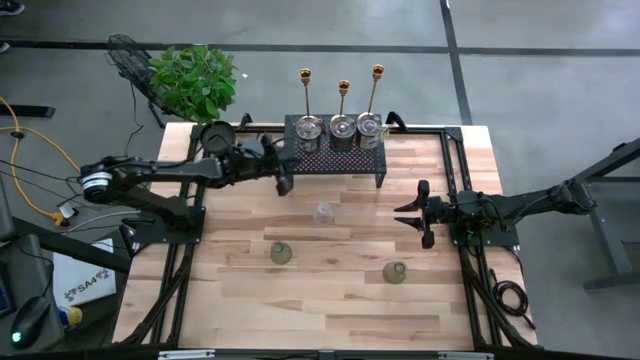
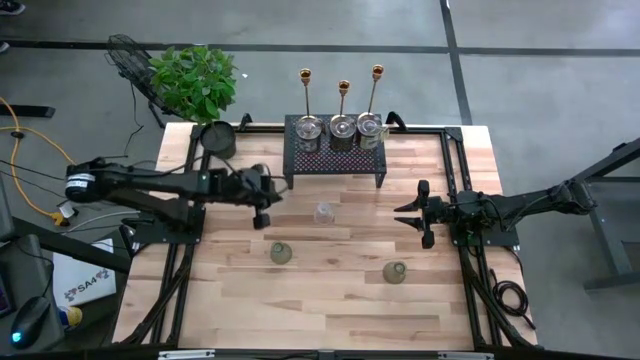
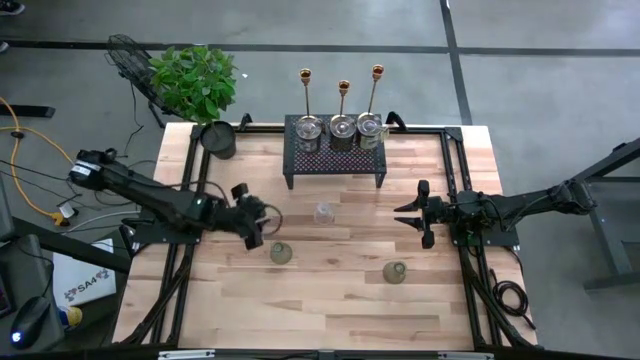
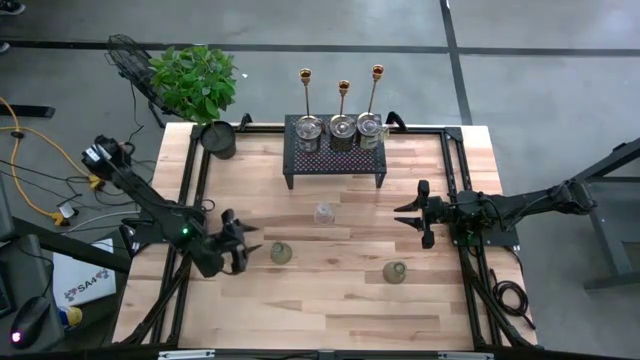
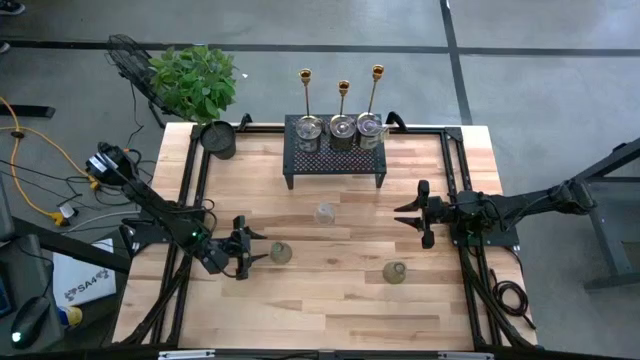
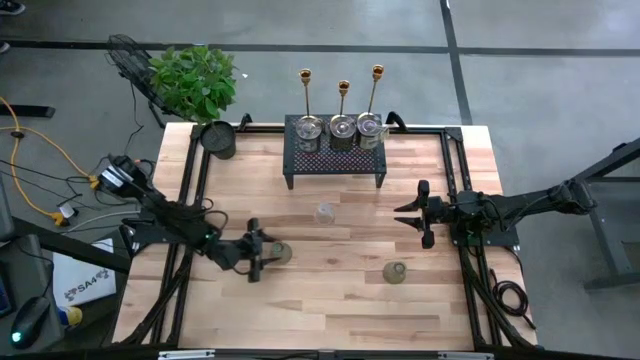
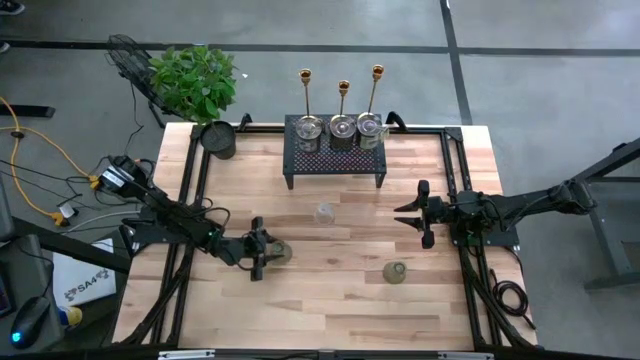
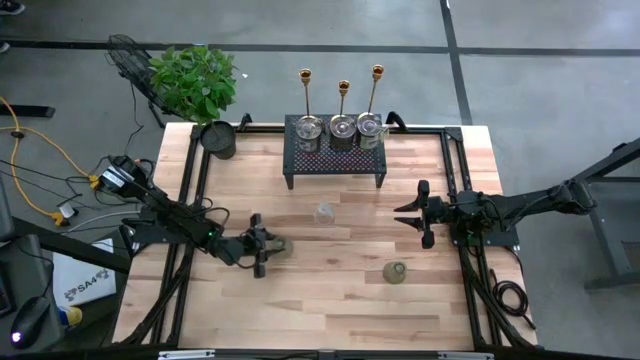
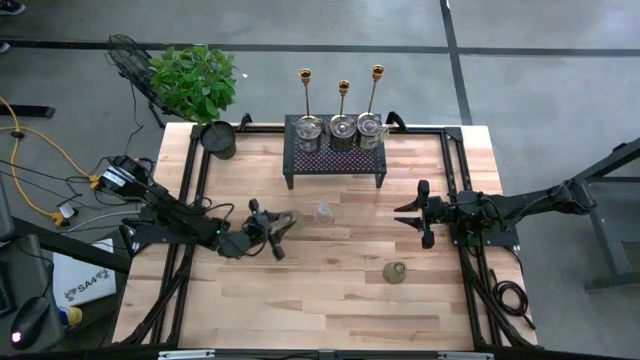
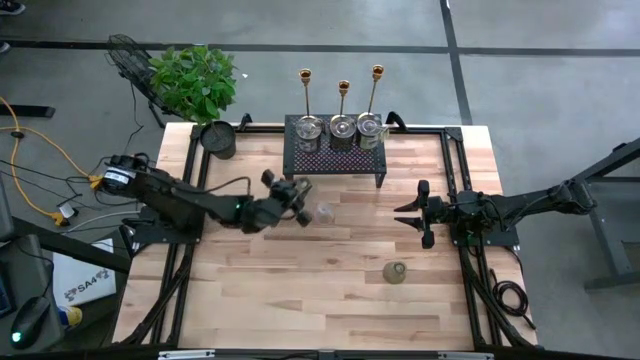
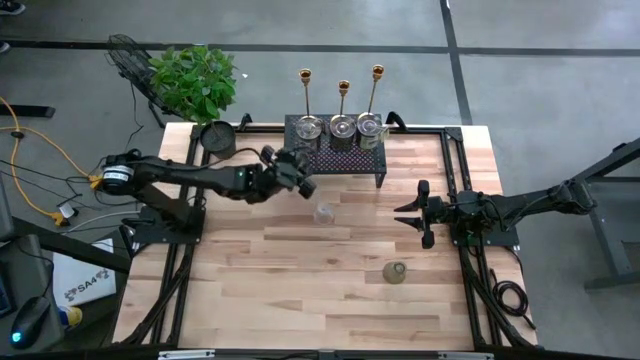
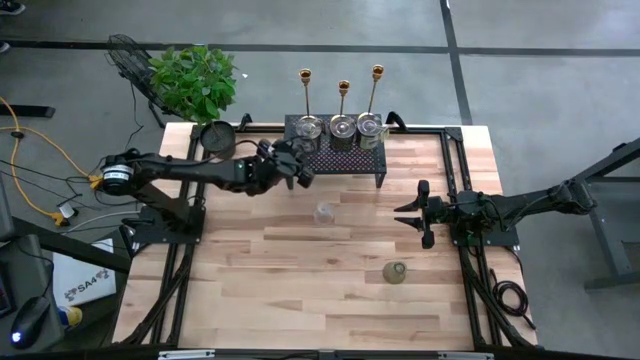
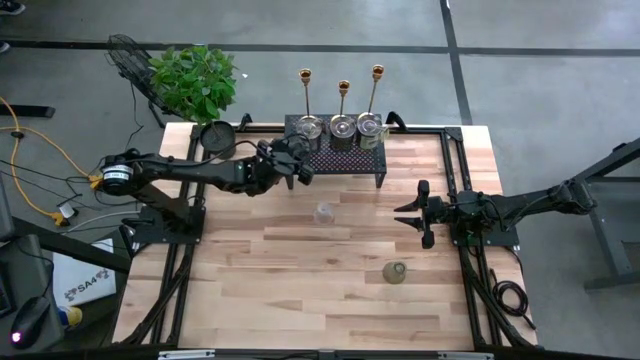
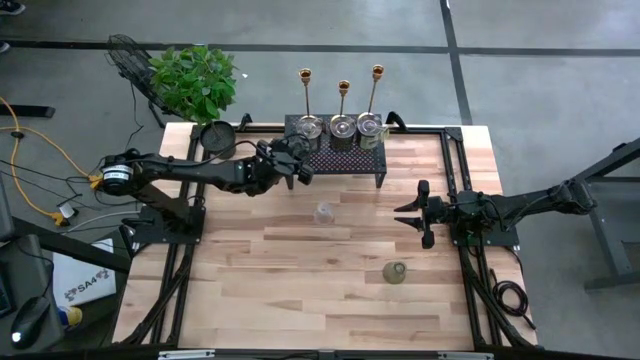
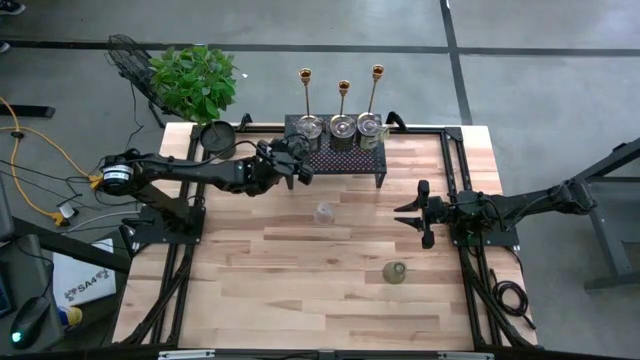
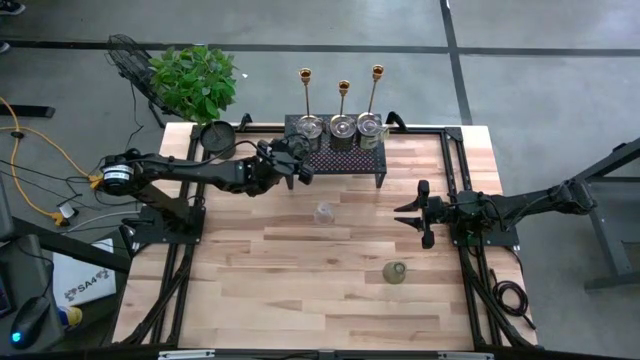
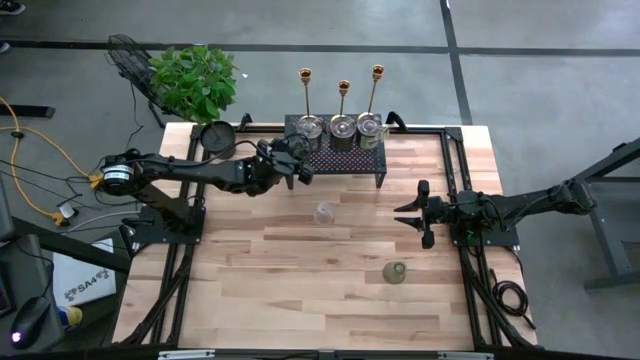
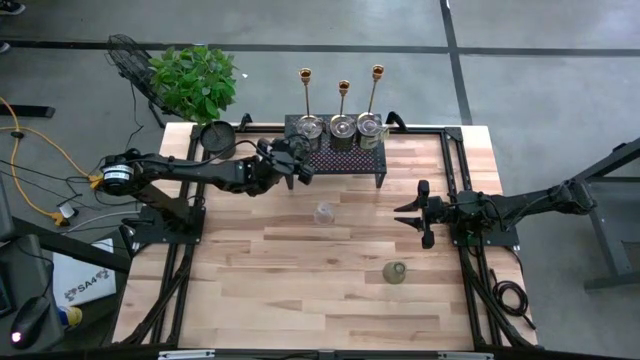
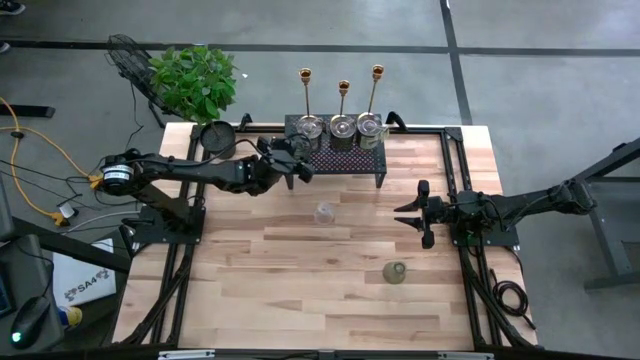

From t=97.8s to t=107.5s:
Task: Pick & Place candle stick holders
Put the top green glass candle holder on the shelf

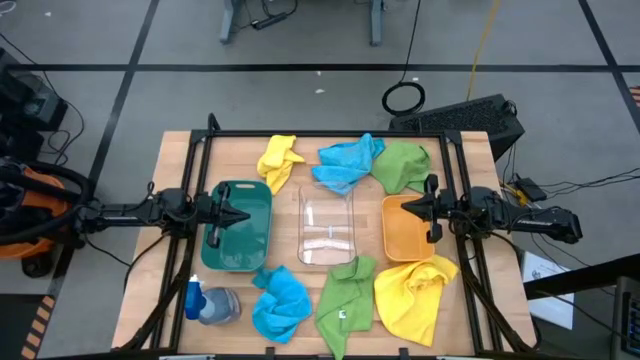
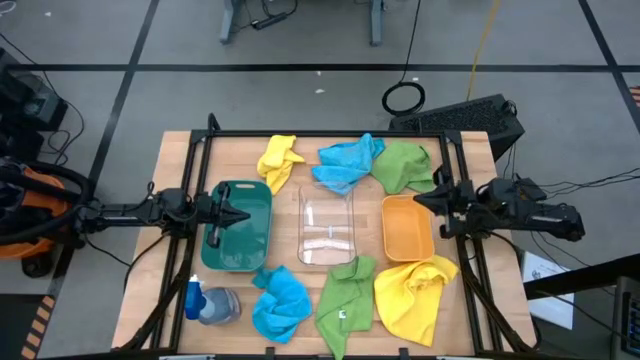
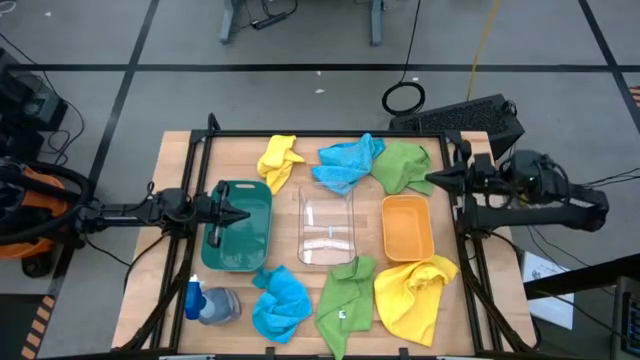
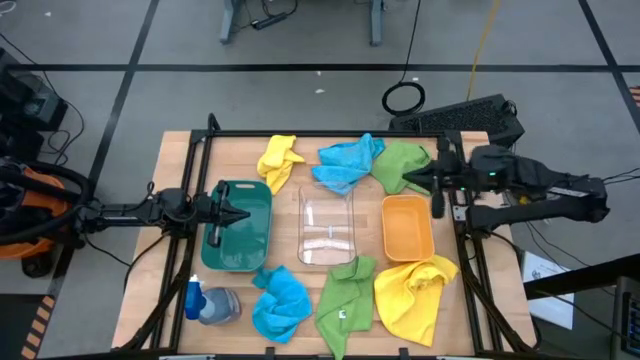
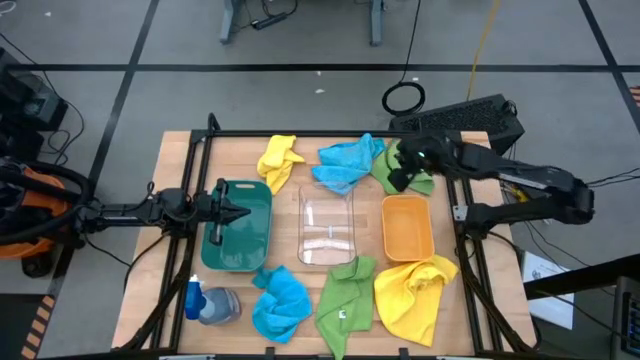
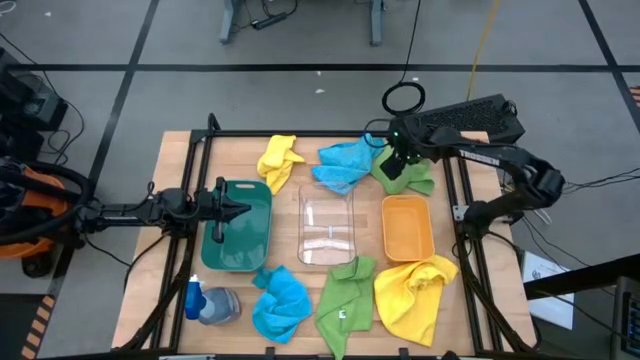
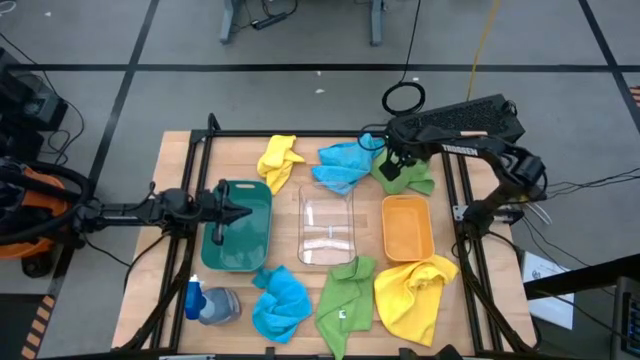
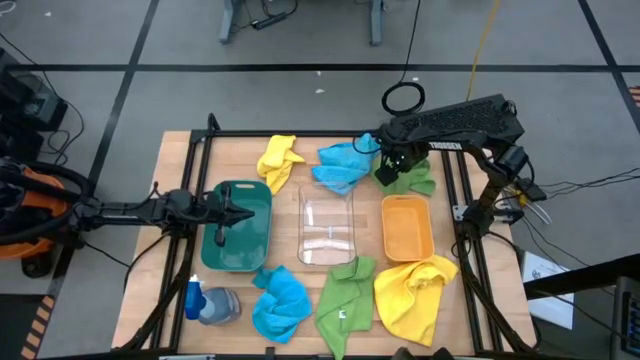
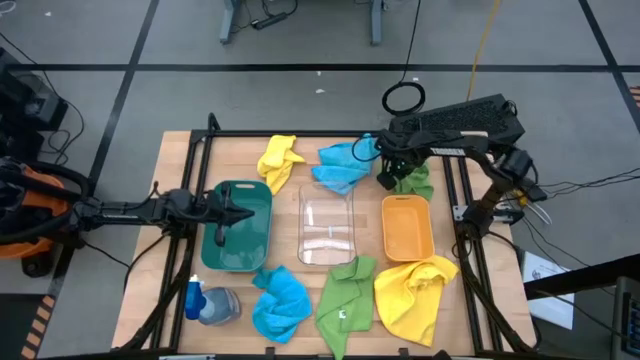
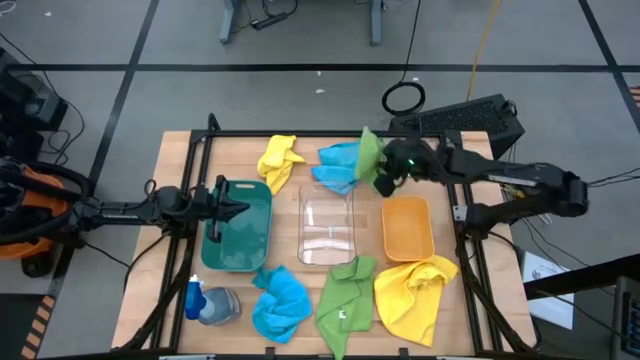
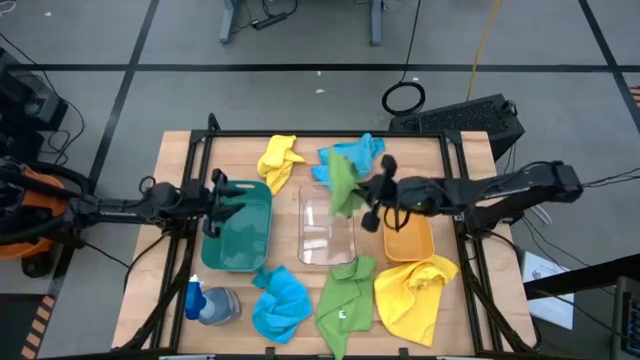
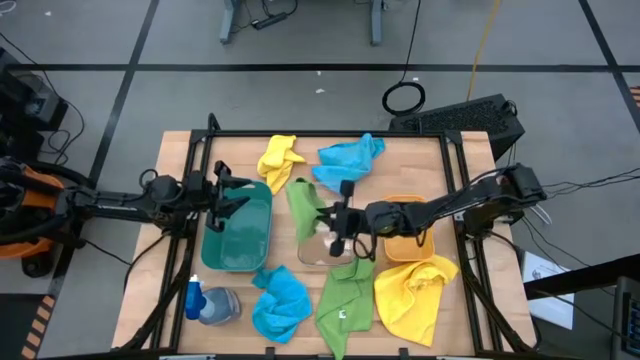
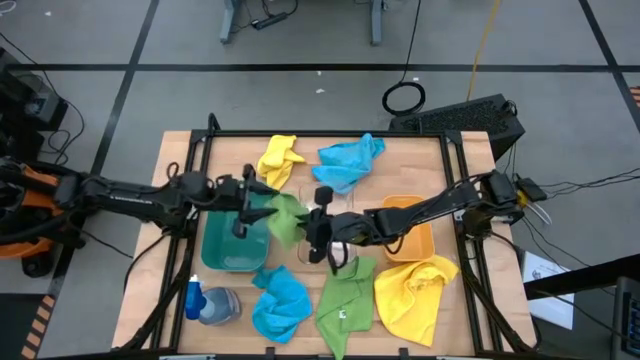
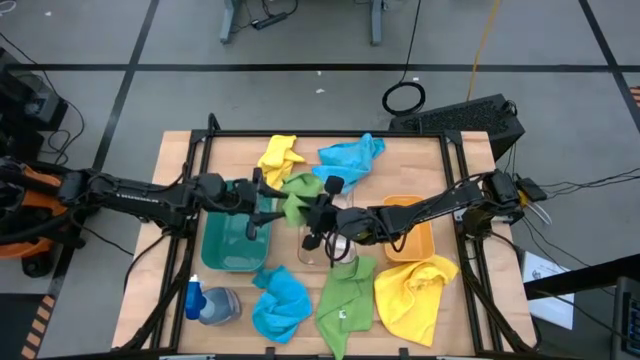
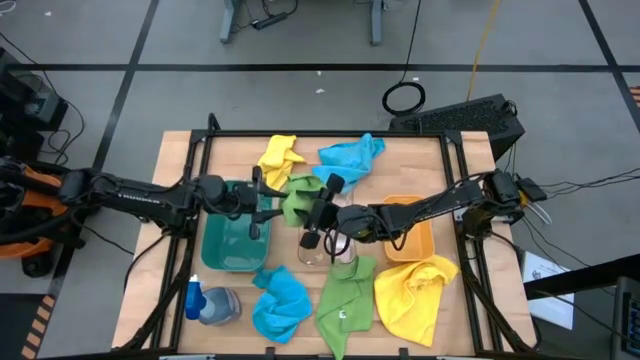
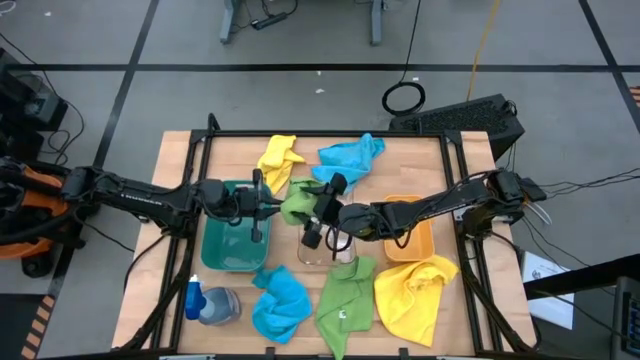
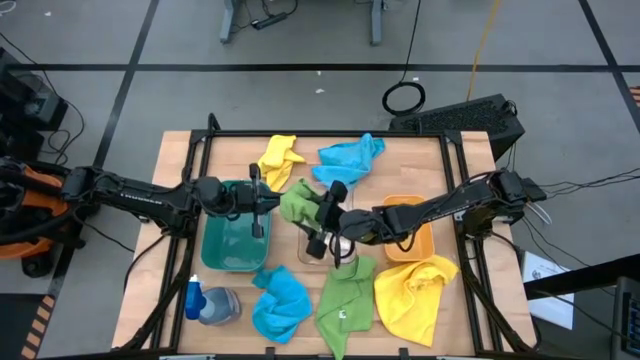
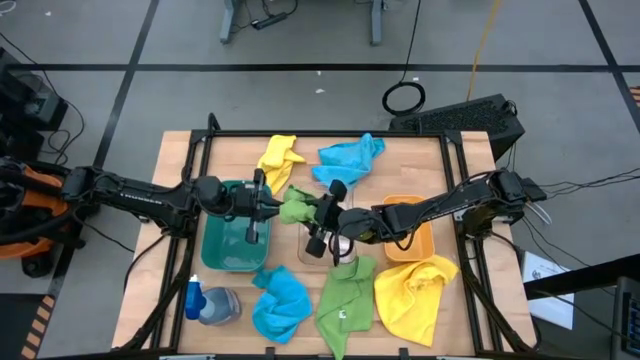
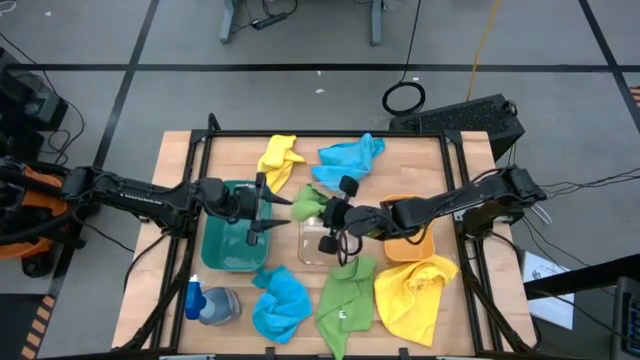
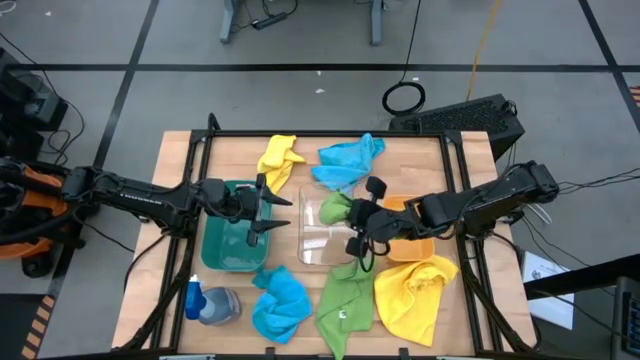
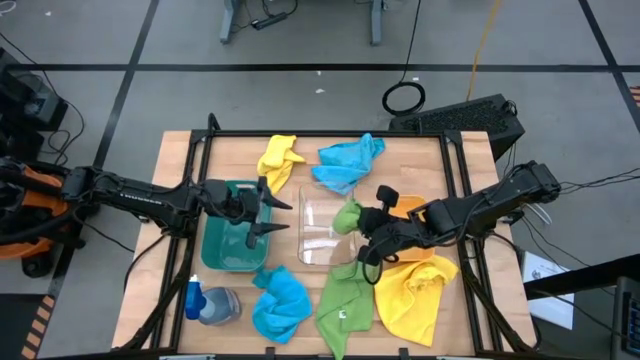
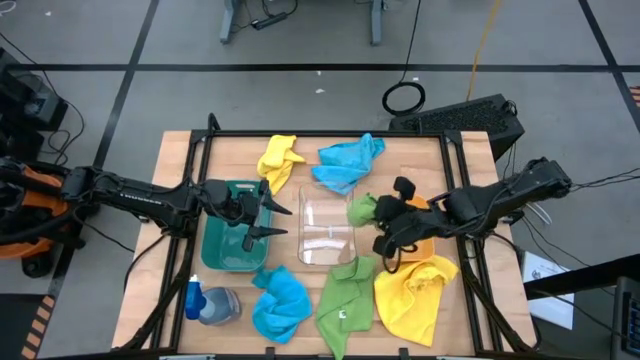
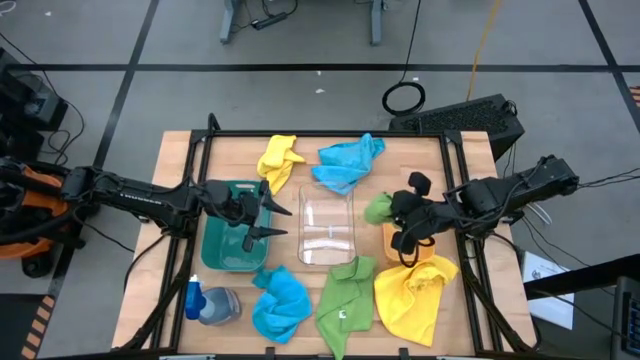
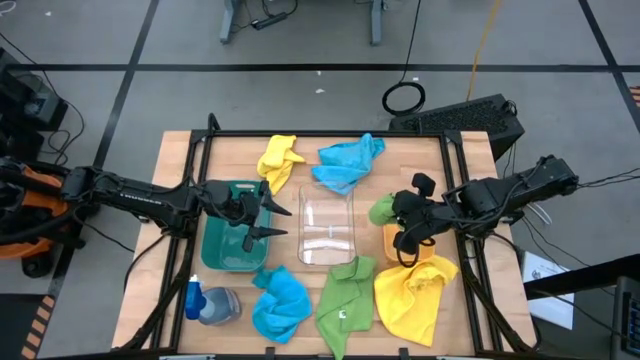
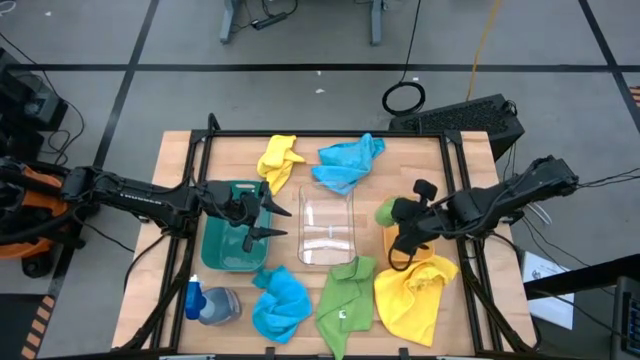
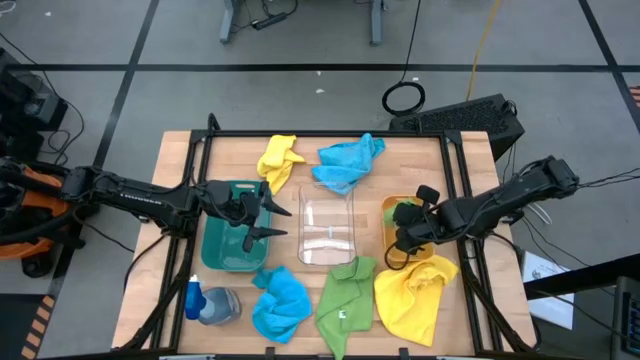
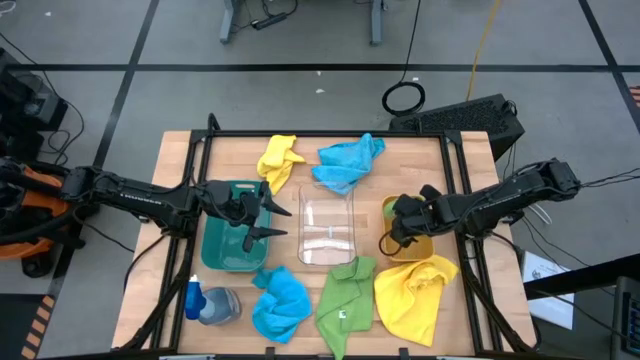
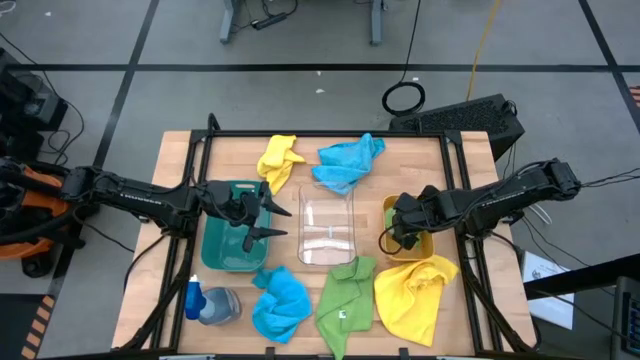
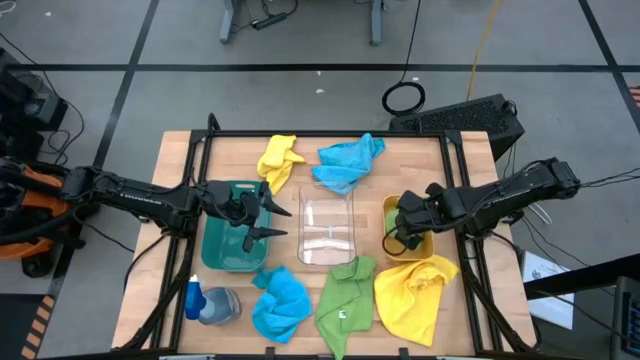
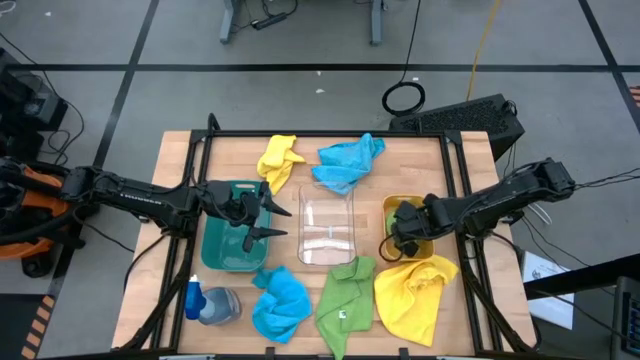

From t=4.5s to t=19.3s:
Task: Sort microfiber towel by color & place in baskets
Put the top green microfiber towel into the yellow bin
